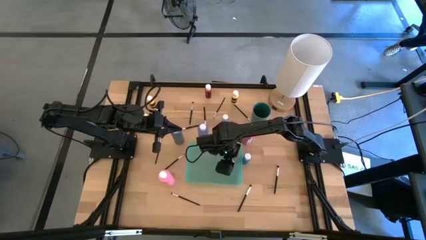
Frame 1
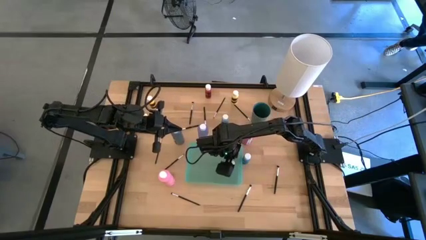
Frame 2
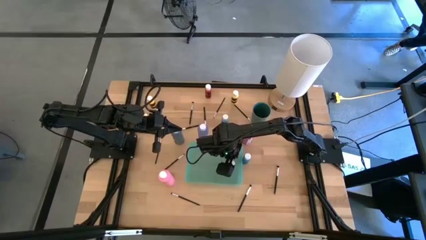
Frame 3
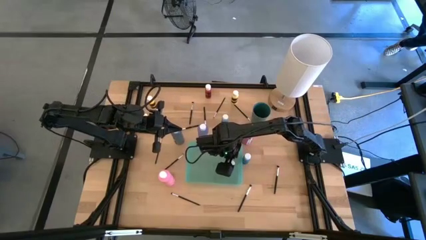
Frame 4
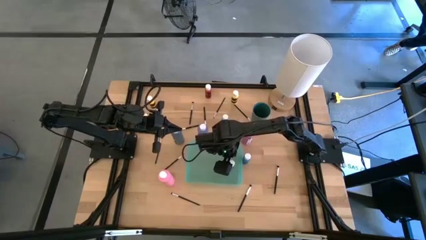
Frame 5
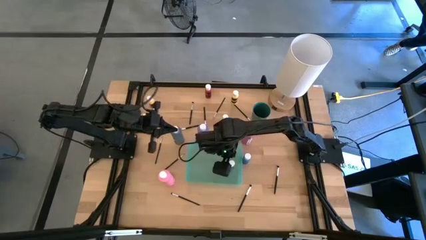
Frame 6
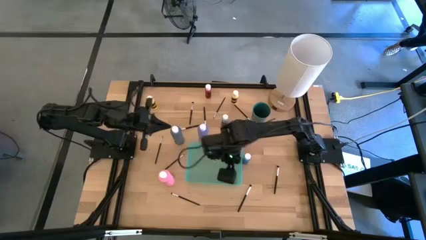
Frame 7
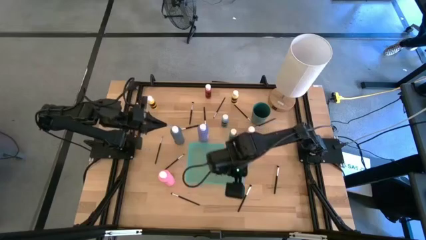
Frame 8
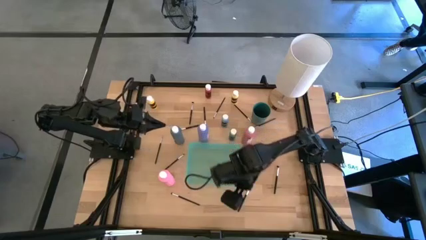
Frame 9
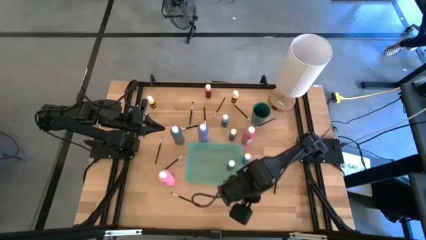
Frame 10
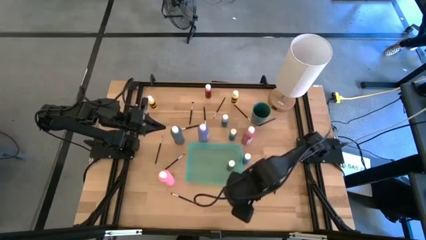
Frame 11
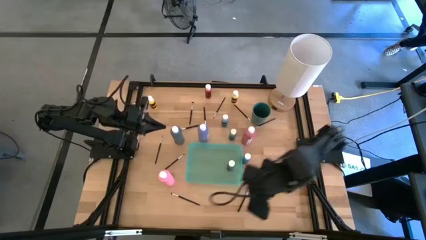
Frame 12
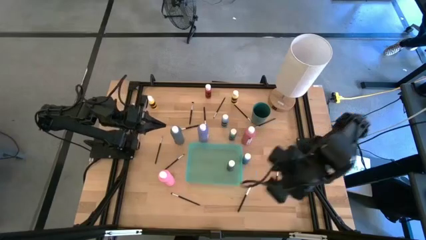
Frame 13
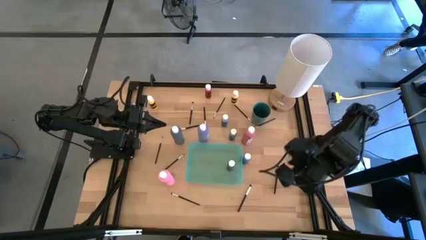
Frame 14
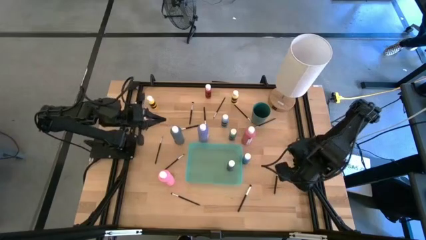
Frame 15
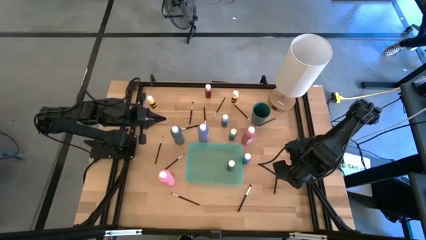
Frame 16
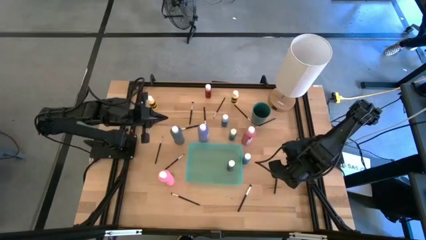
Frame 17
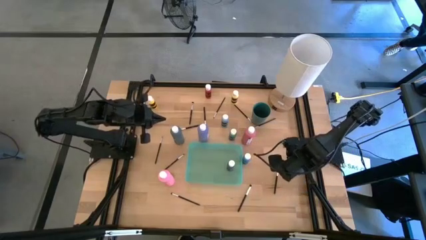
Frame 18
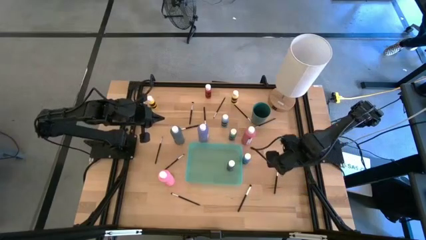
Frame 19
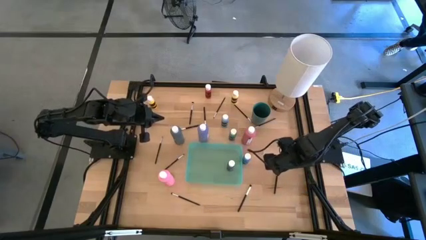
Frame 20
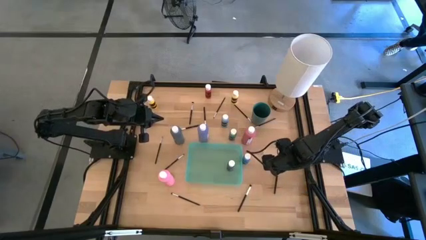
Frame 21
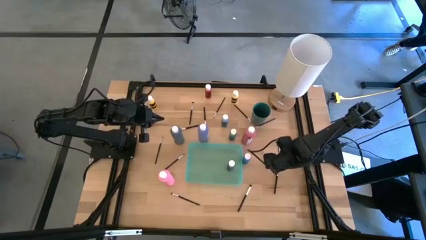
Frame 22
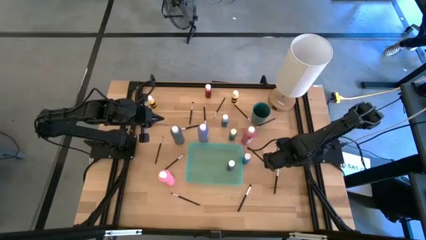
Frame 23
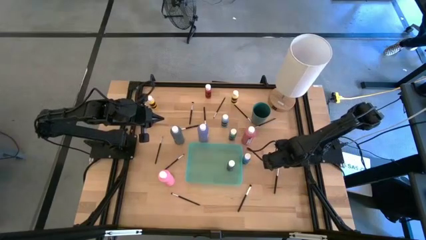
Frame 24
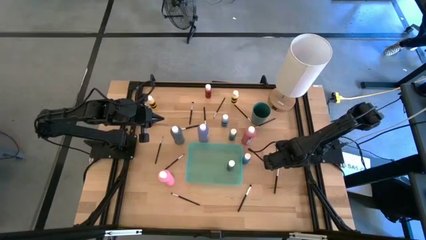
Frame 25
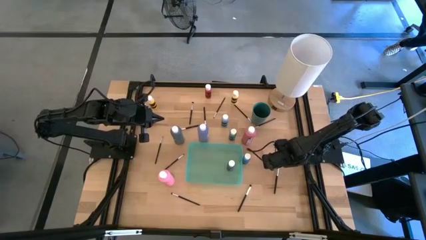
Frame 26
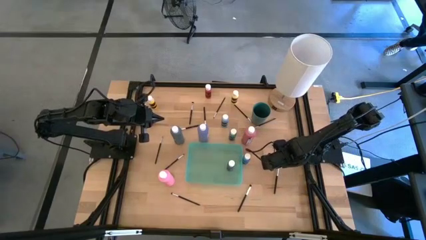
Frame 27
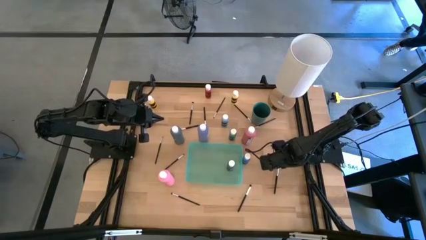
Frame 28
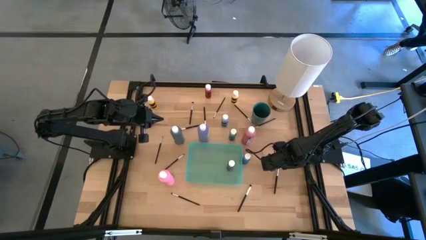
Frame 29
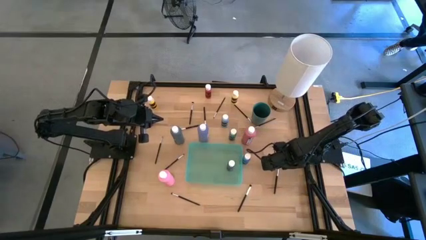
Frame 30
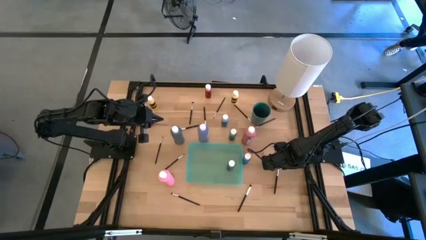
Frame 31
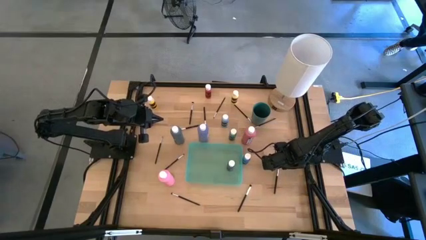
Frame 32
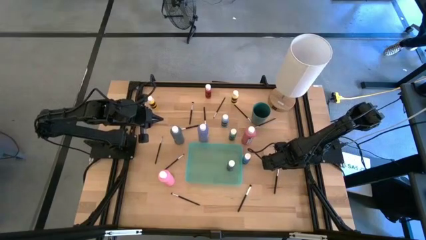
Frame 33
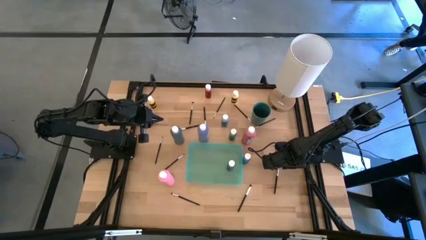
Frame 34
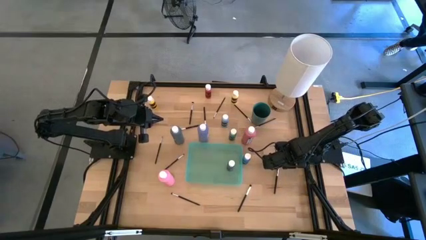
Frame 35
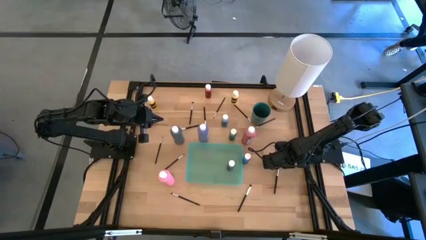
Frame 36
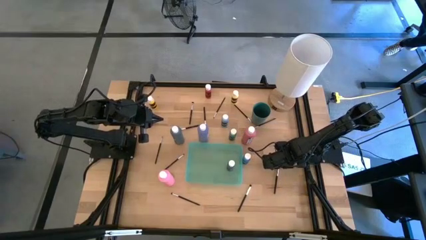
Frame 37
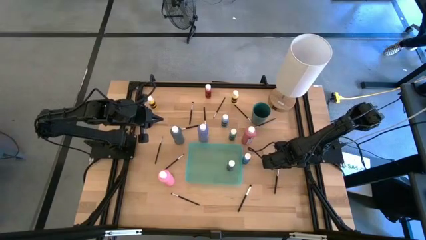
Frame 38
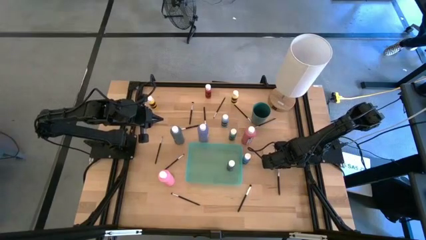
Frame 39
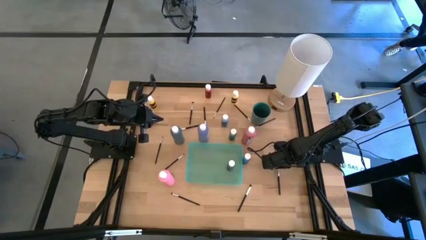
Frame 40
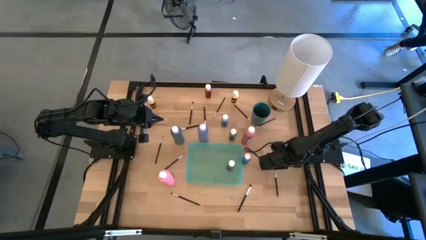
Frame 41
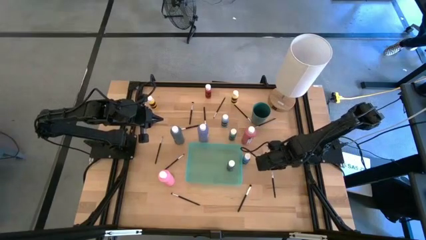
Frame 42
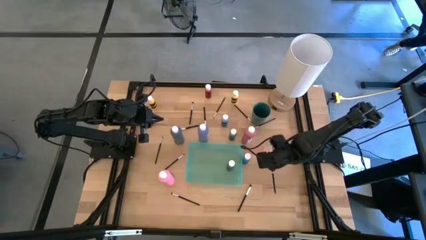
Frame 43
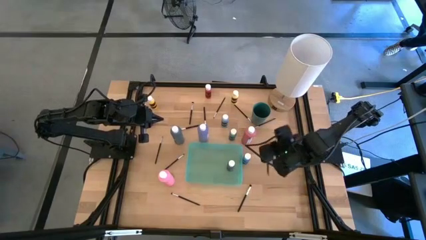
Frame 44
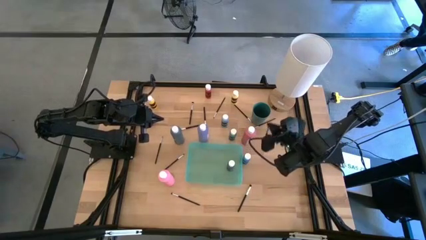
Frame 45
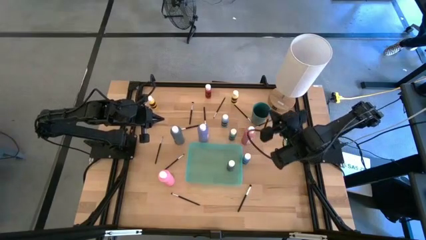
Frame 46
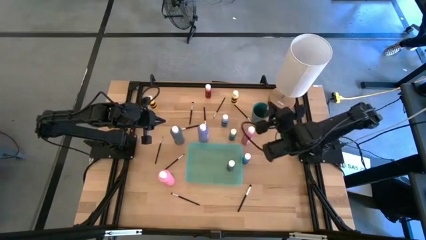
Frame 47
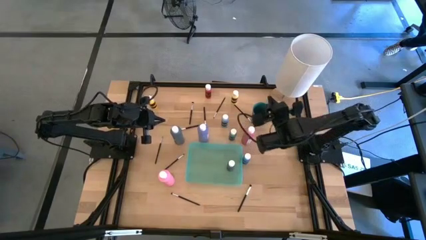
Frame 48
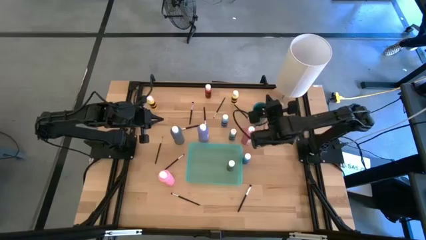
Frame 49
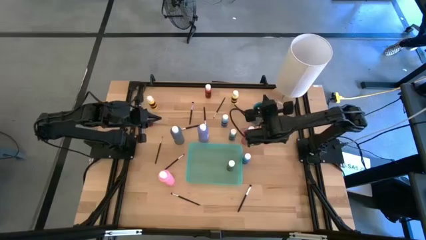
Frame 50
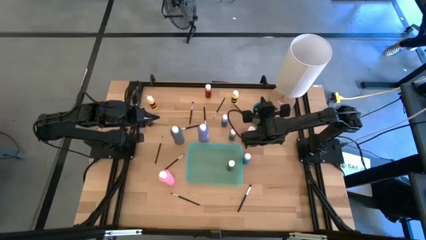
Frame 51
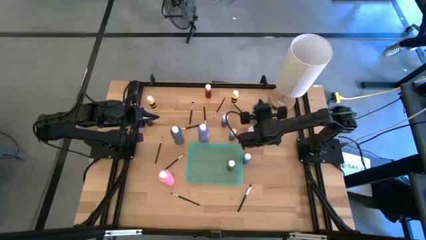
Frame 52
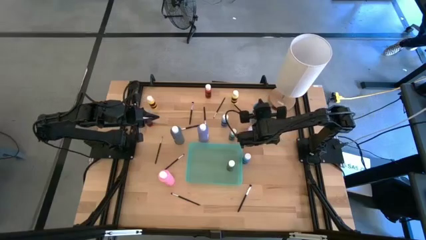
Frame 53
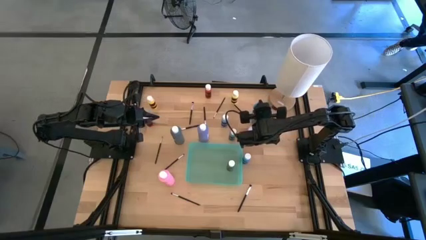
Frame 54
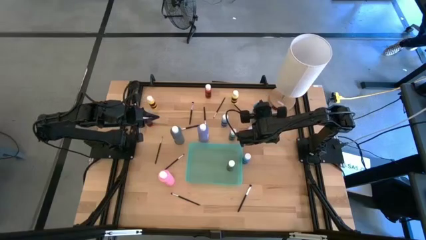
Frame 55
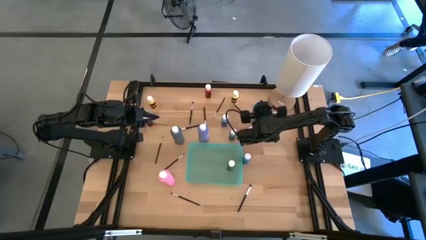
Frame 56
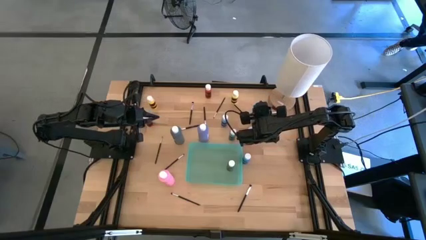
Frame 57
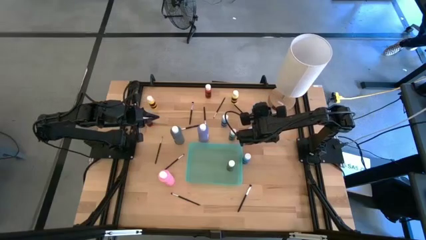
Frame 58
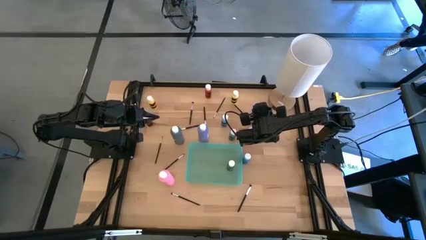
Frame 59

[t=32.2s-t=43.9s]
Task: Pick & Place Paint Supplies
Put the black eyeshadow brush into the green cup
